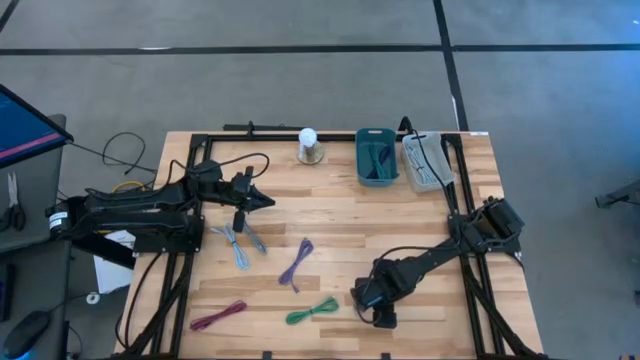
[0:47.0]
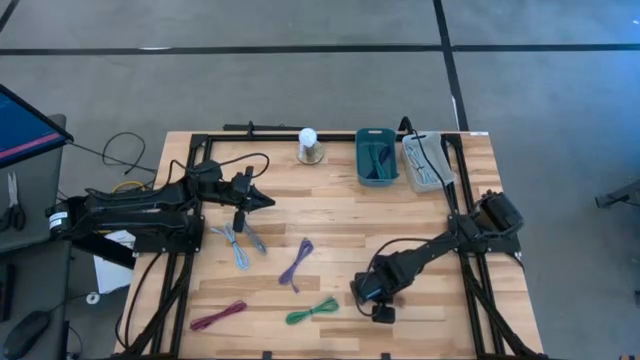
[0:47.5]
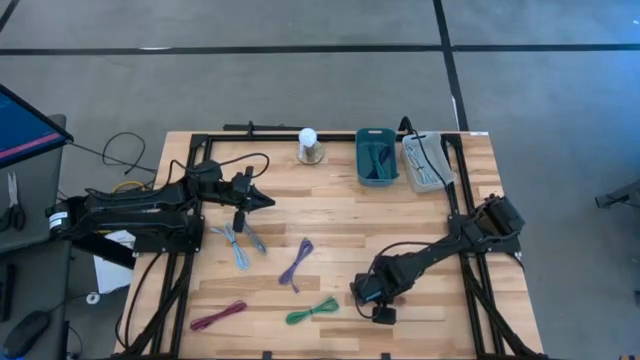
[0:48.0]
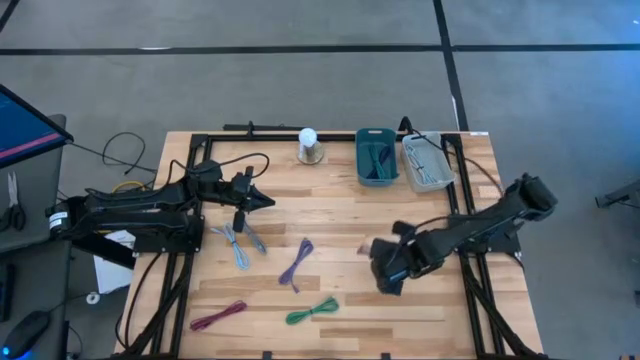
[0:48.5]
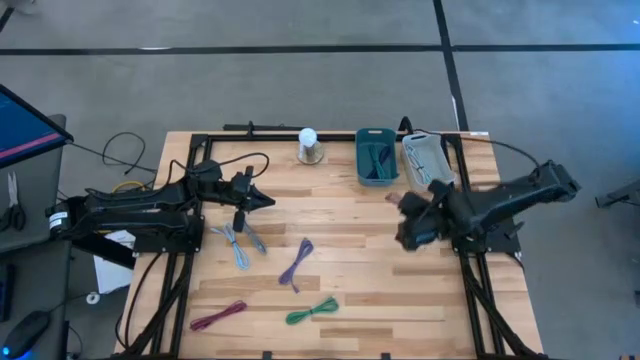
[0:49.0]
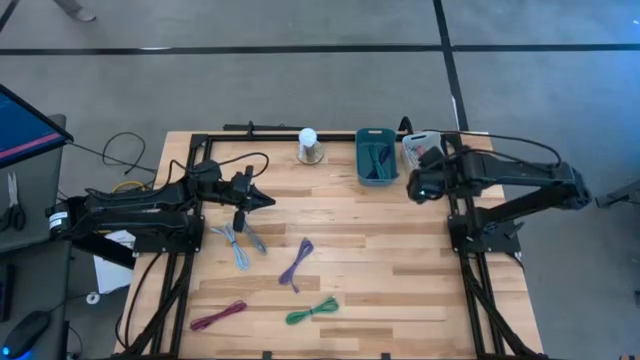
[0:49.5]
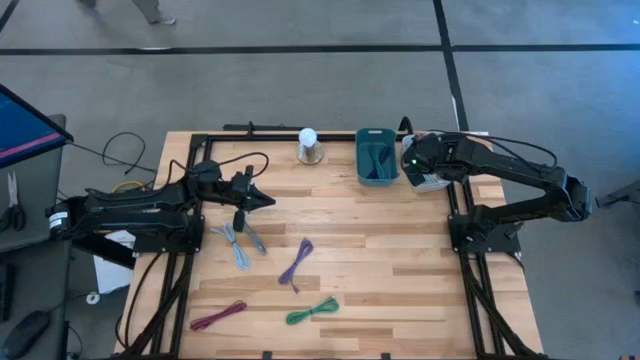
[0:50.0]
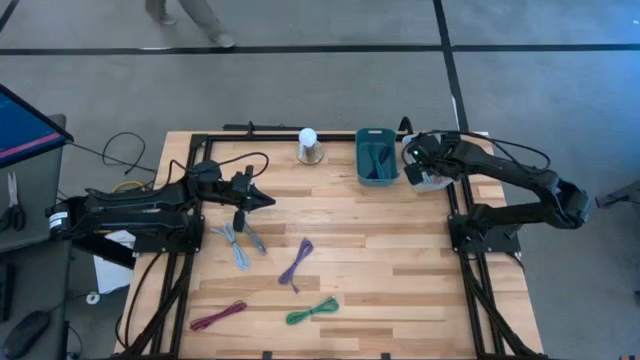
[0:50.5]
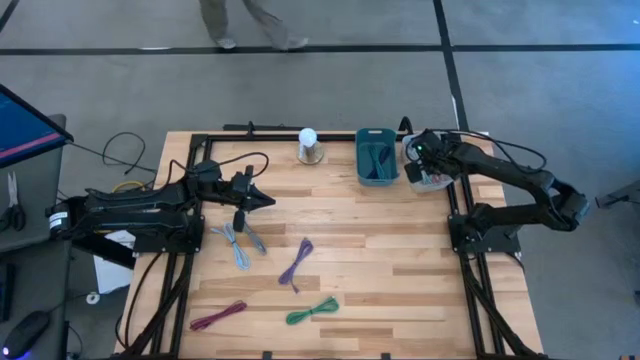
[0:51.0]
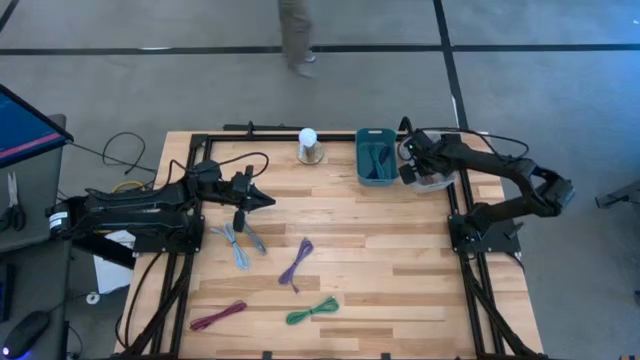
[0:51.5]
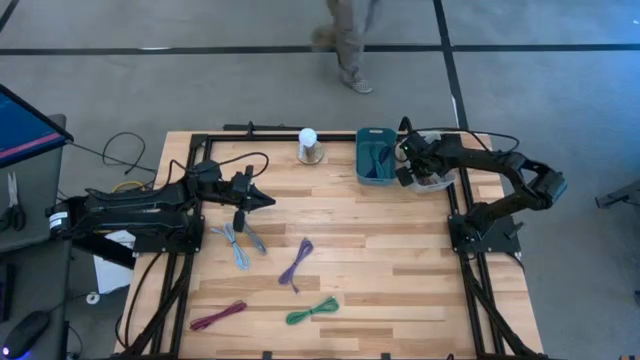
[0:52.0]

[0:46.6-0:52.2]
Task: Pick & Place USB Port
Put the pink charger cable into the gray bin

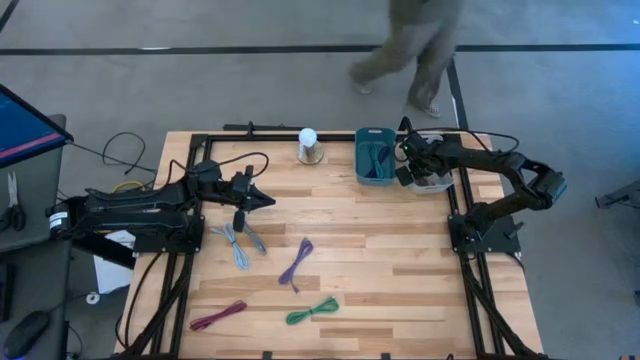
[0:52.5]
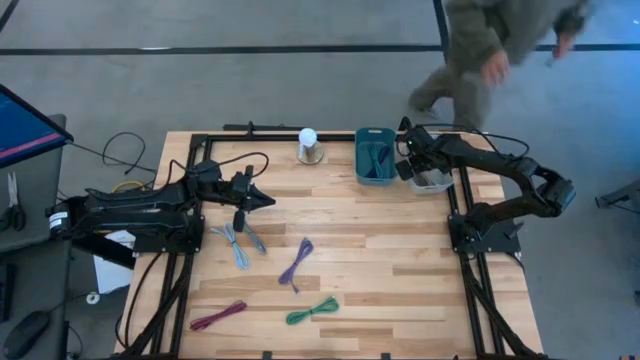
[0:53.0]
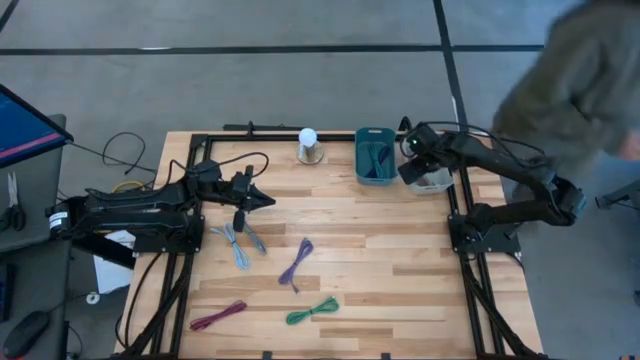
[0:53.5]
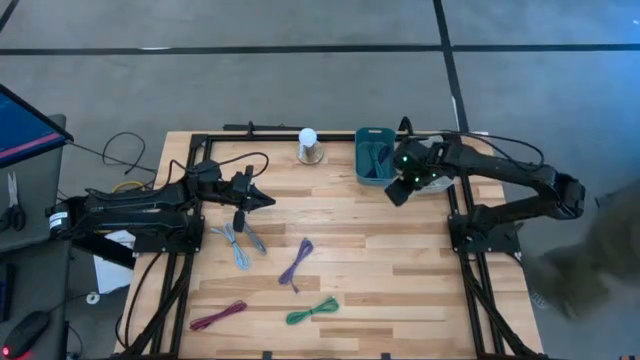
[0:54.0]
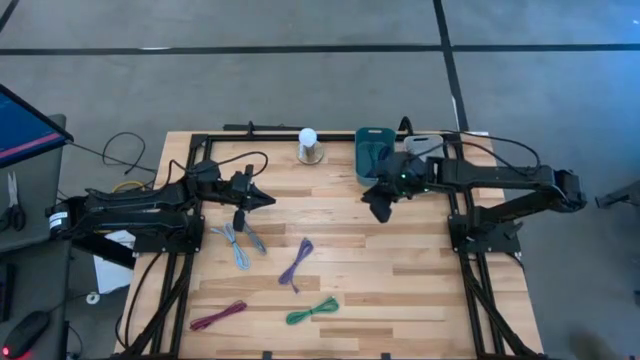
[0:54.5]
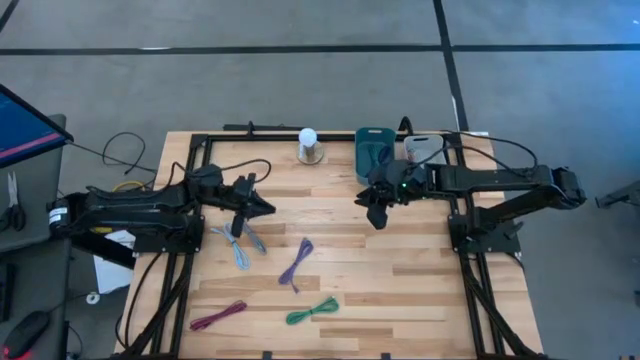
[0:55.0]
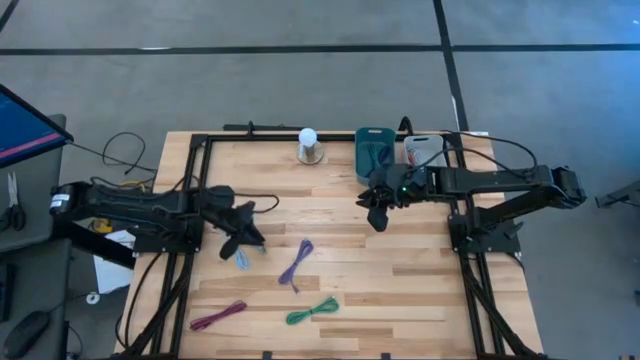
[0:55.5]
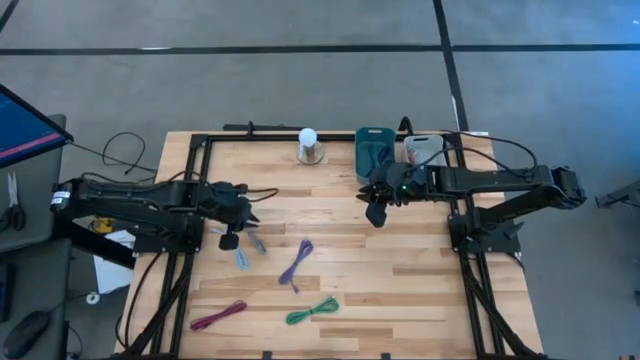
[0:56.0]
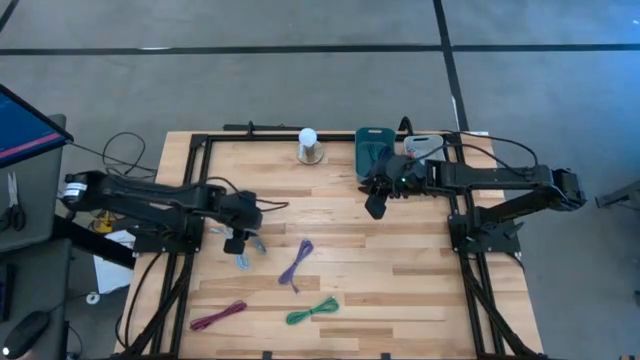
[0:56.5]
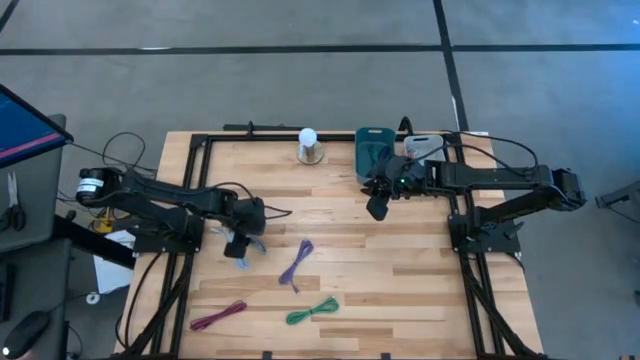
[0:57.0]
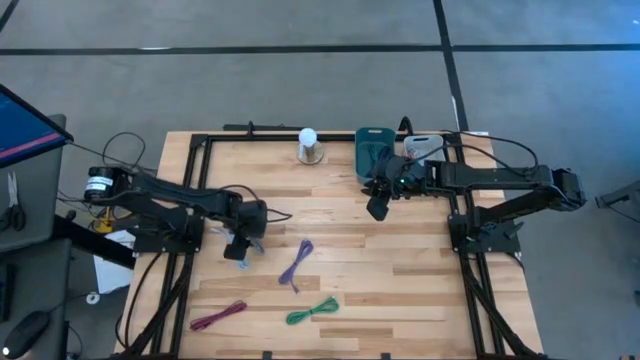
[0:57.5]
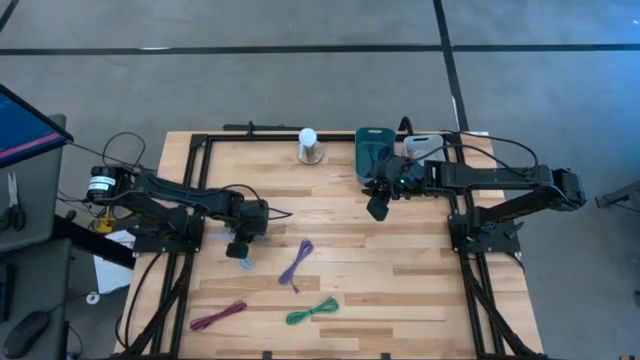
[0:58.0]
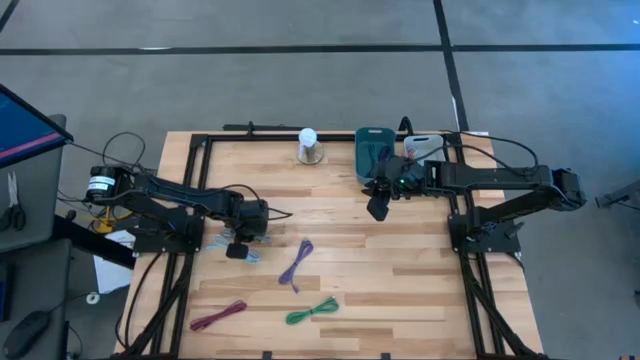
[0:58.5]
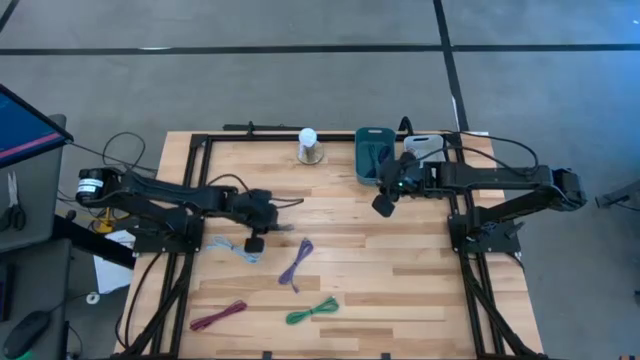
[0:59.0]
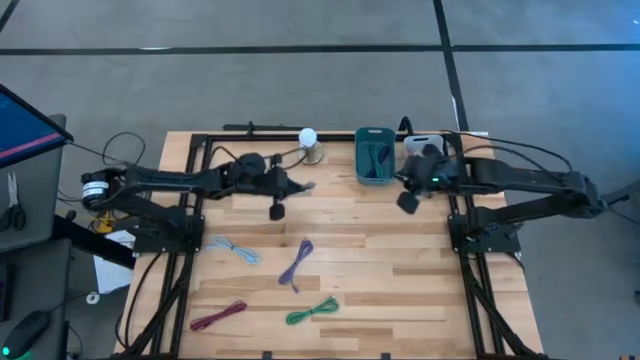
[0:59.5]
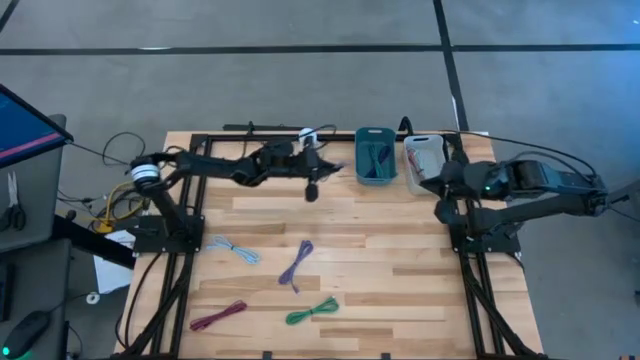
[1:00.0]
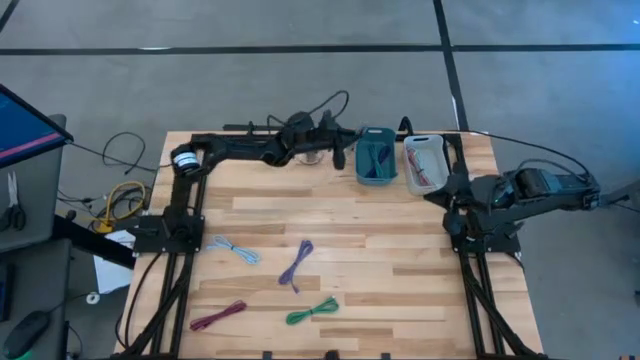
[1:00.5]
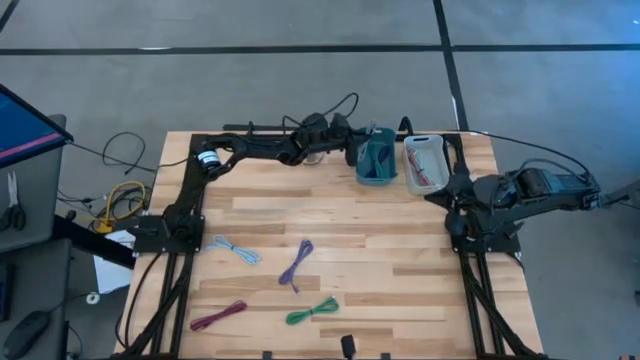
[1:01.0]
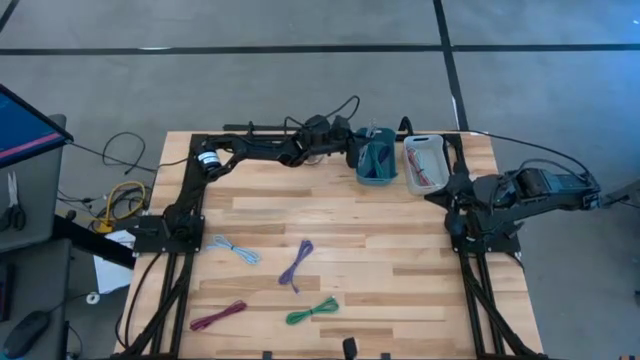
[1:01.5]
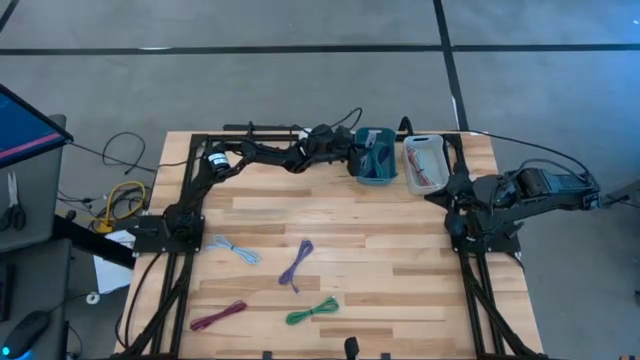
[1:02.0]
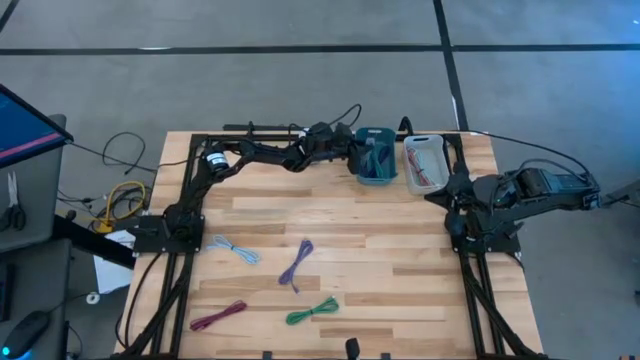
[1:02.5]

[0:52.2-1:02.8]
Put the braided white charger cable into the blue bin

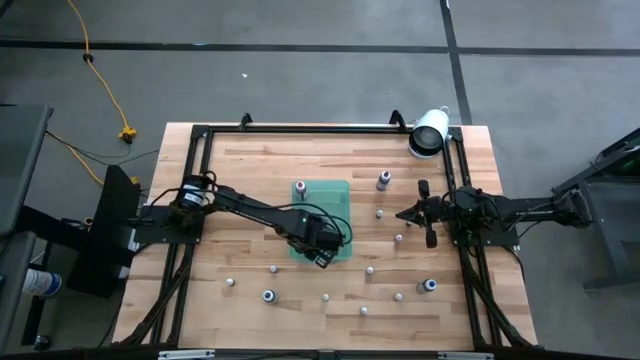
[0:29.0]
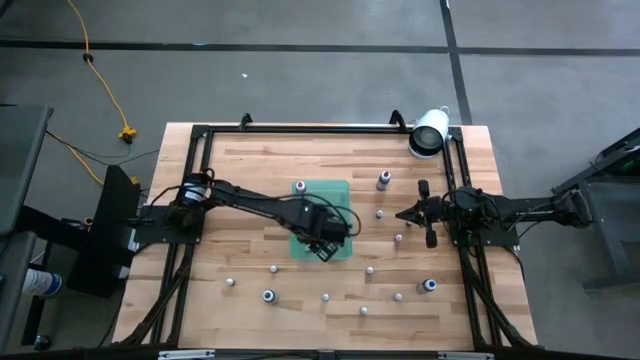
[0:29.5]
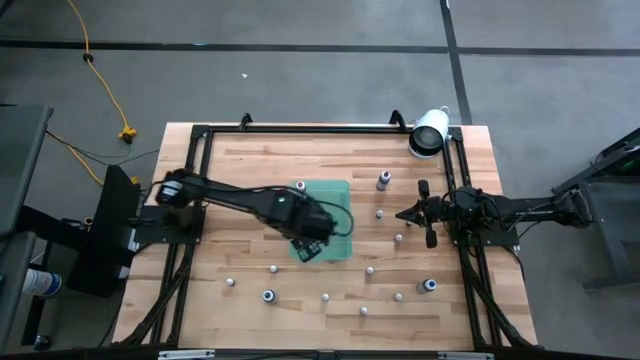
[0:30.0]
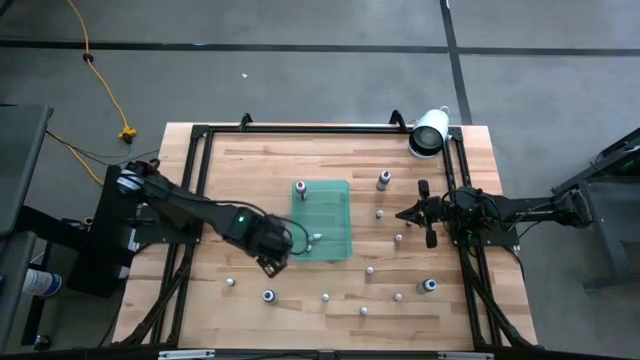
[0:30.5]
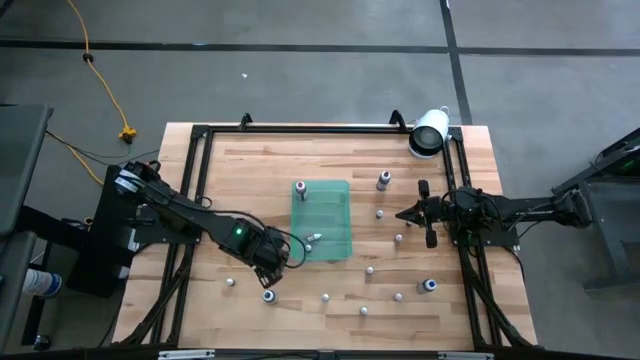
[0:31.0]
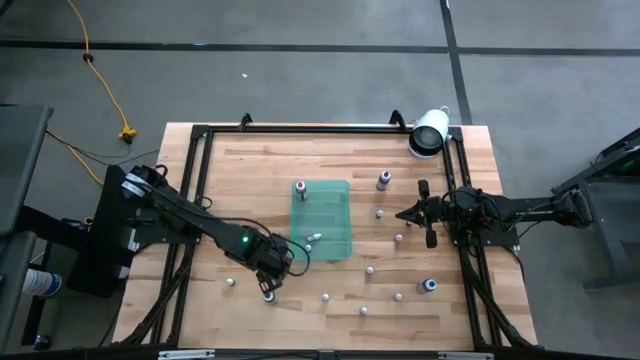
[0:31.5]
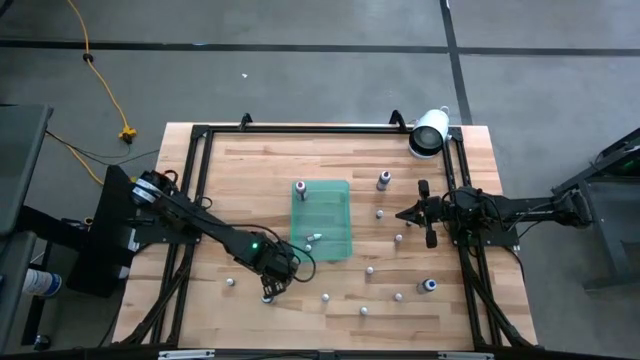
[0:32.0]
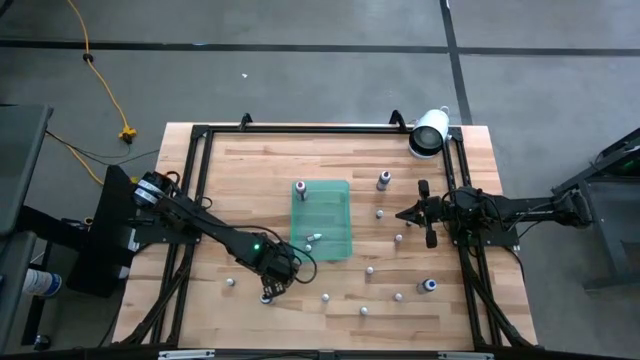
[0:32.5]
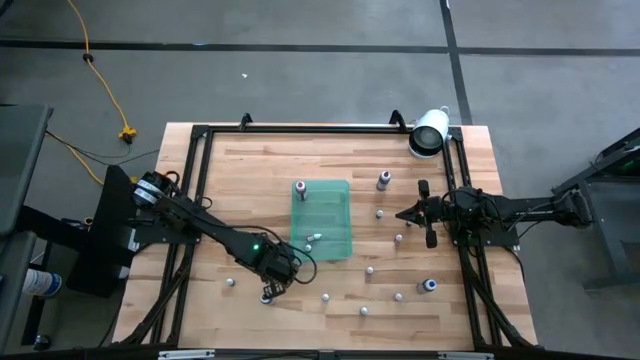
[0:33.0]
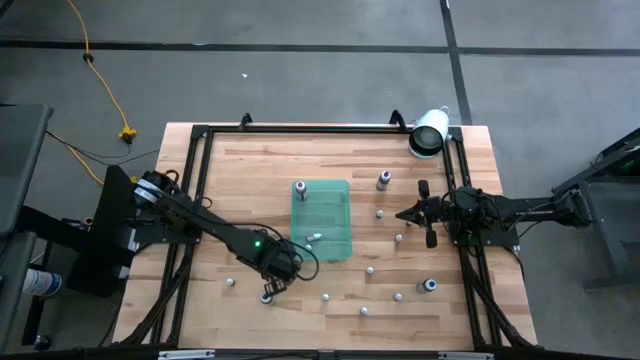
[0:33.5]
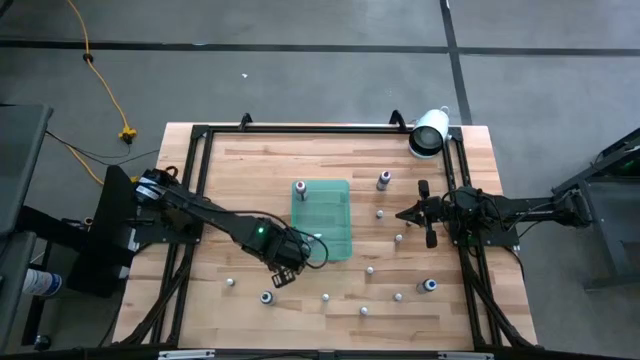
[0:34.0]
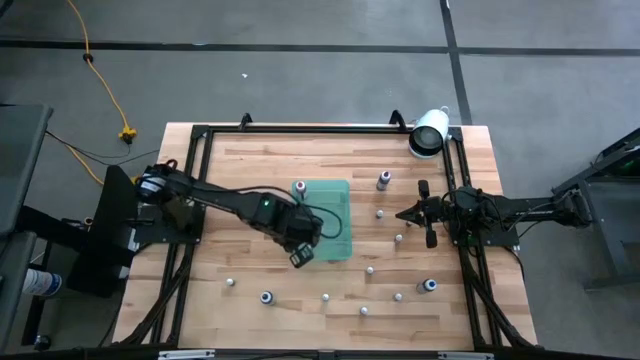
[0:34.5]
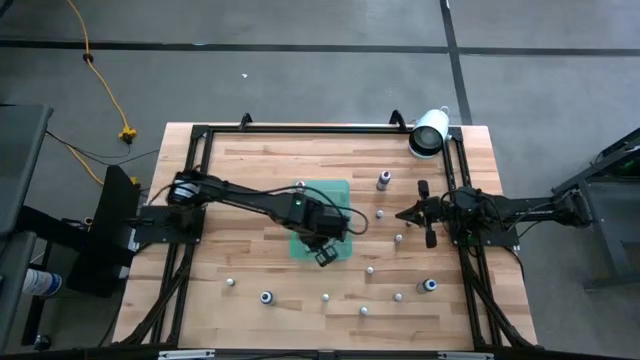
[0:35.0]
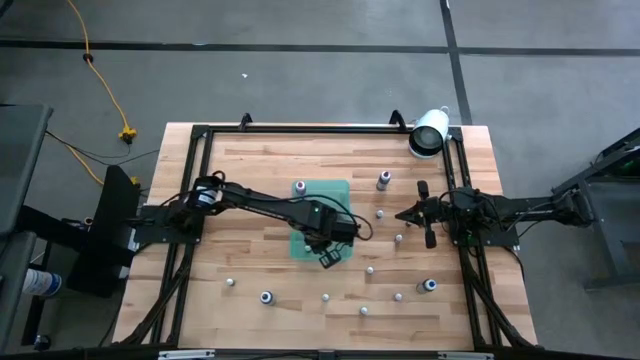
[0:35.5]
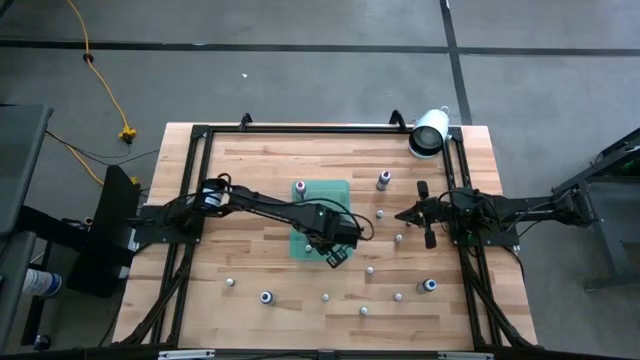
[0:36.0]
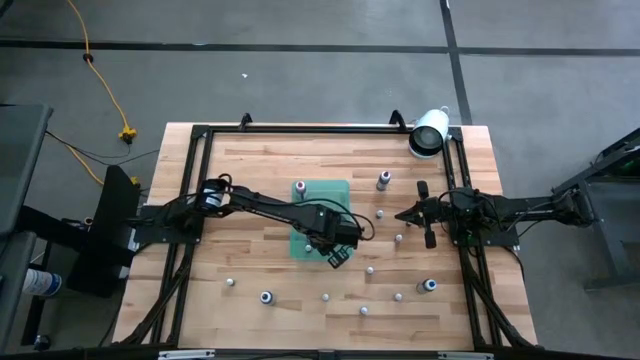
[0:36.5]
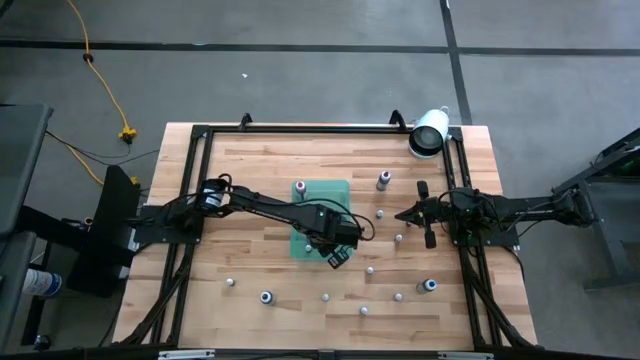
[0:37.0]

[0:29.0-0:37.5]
Task: Pick & Place food coloring
Put the small light green food coloring bottle into the green bin
